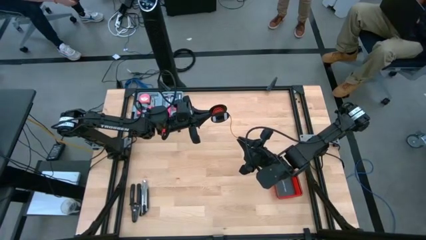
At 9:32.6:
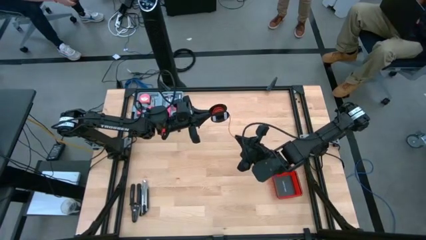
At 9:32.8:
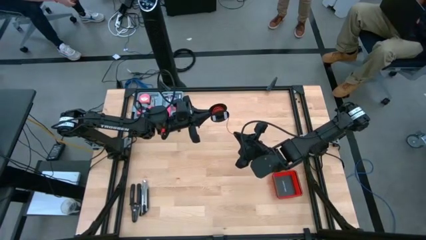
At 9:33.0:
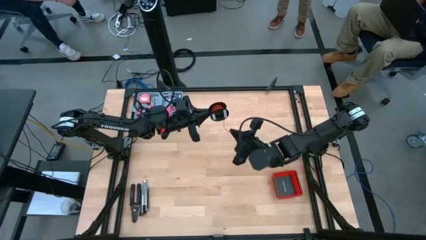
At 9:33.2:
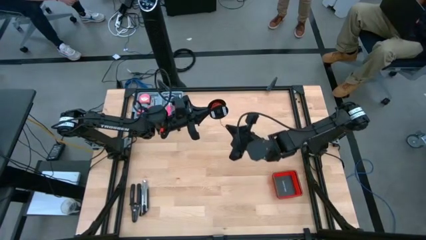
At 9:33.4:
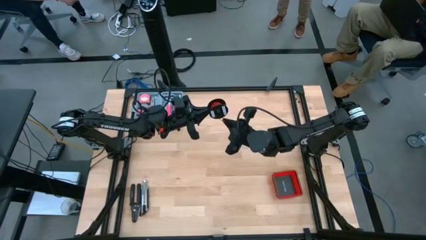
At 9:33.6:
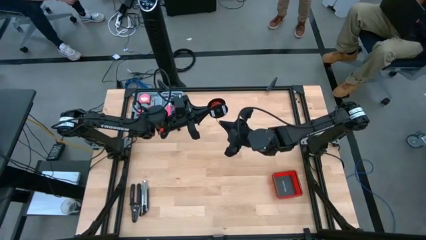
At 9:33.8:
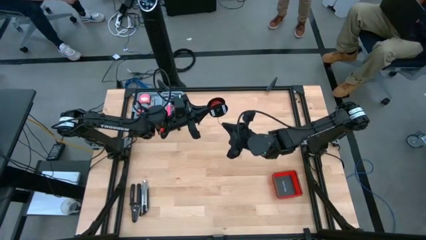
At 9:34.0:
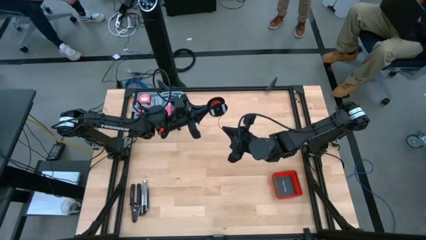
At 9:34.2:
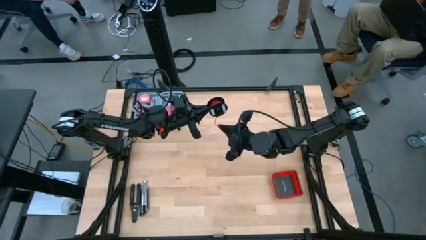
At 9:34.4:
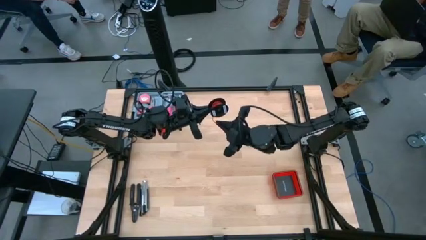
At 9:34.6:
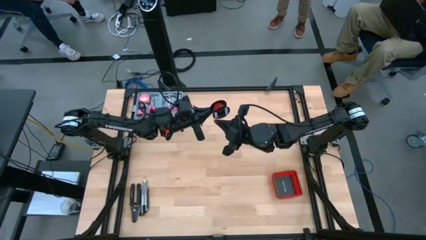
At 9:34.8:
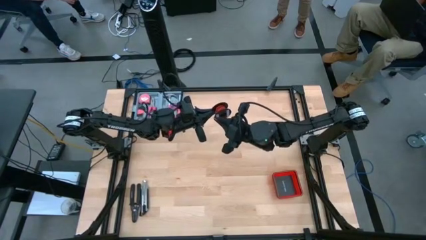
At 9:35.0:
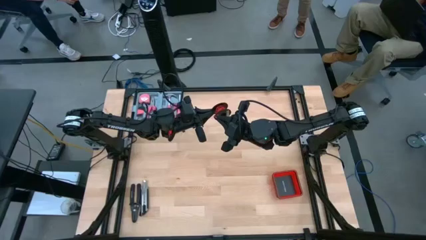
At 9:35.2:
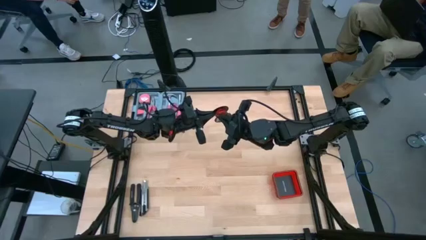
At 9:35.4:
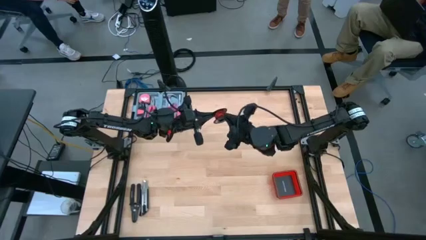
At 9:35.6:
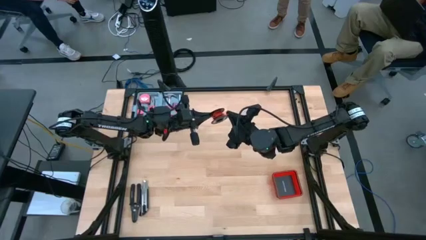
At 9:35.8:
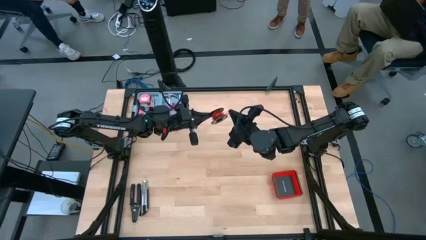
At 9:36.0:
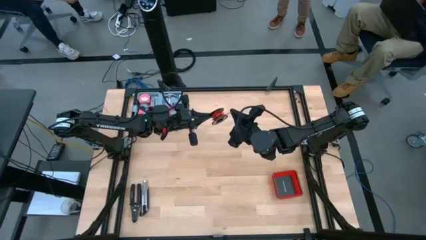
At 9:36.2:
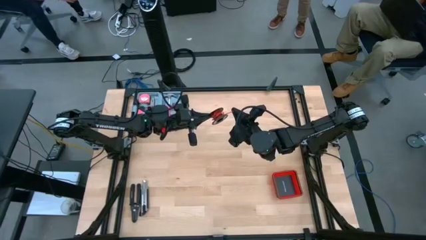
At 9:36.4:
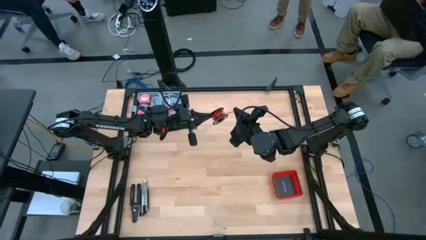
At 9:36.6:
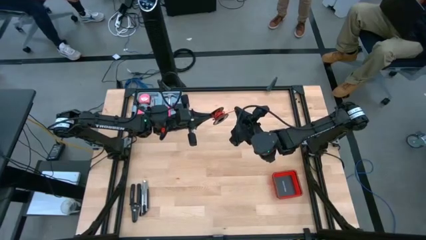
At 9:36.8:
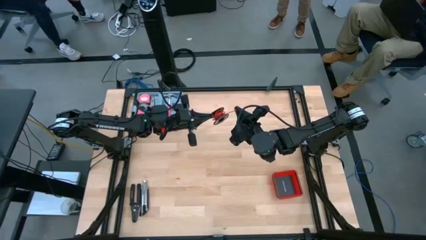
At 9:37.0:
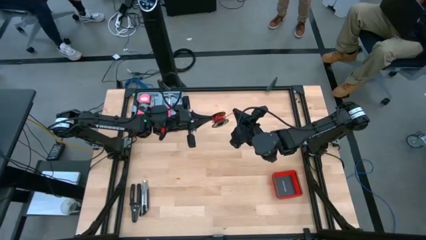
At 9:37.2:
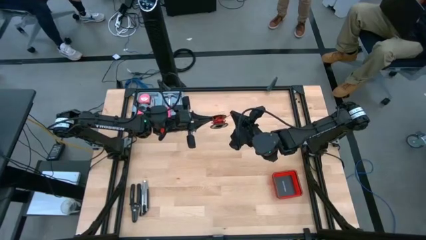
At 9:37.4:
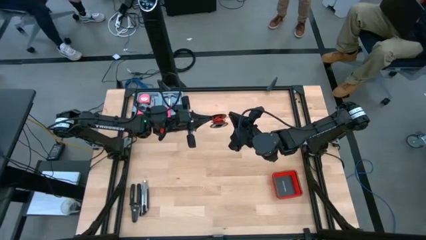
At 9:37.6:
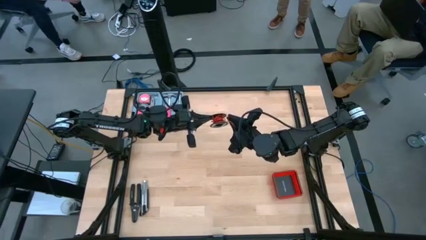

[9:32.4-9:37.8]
Task: Coil cords
Coil the red wire onto the spool

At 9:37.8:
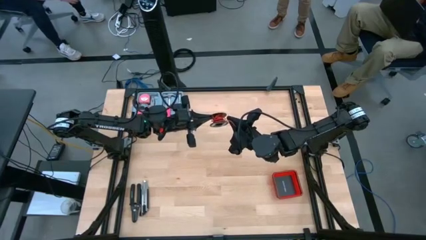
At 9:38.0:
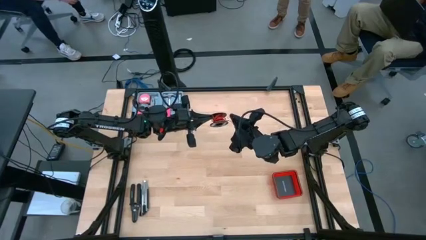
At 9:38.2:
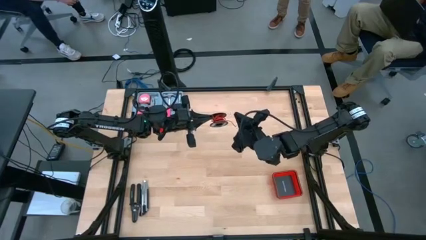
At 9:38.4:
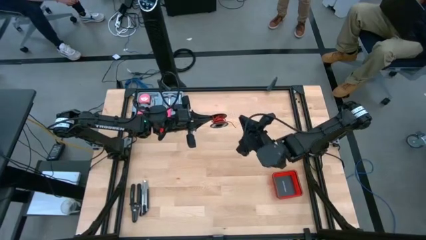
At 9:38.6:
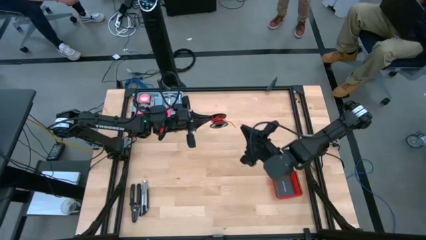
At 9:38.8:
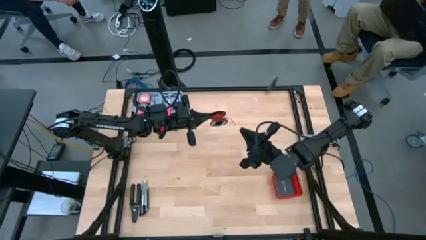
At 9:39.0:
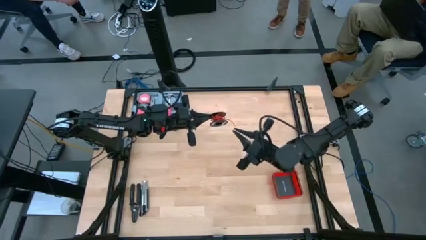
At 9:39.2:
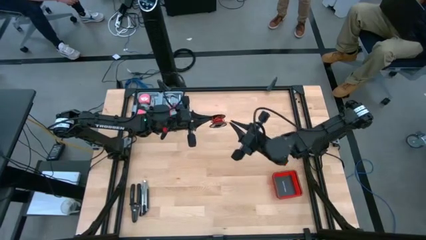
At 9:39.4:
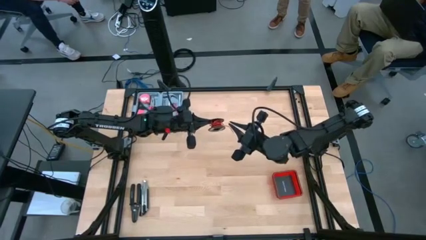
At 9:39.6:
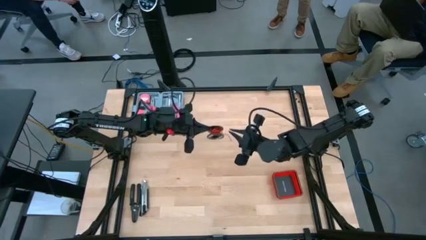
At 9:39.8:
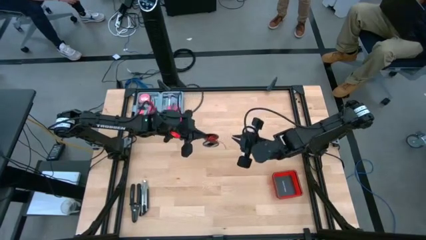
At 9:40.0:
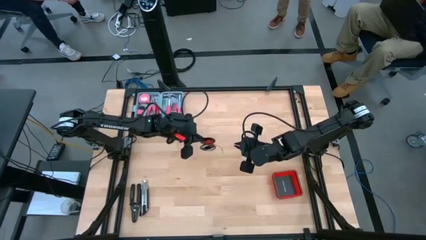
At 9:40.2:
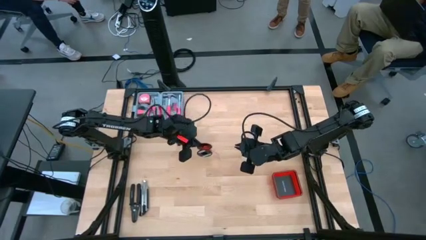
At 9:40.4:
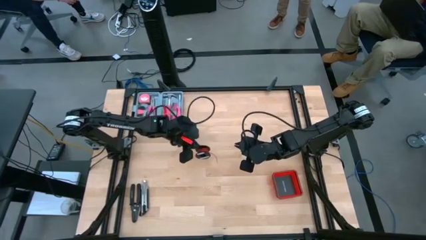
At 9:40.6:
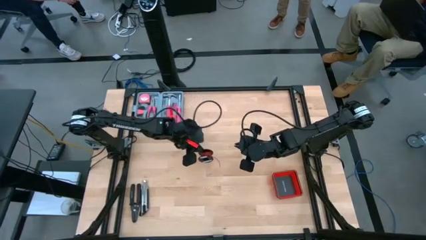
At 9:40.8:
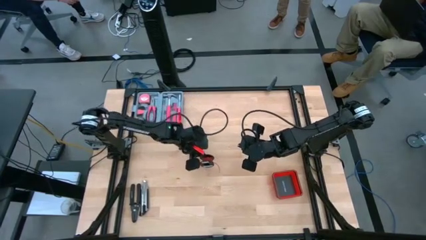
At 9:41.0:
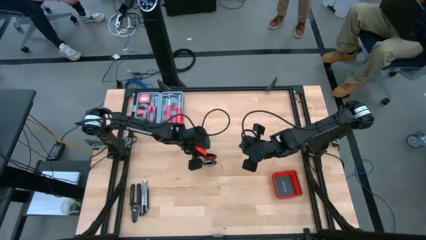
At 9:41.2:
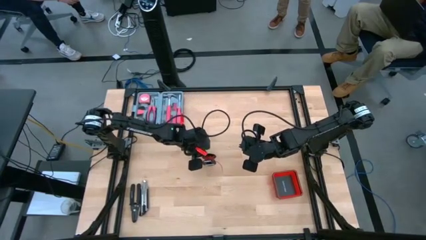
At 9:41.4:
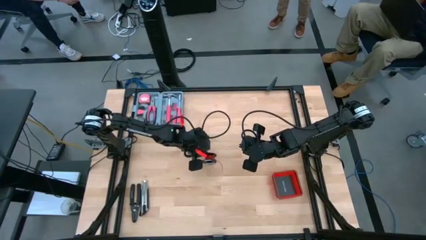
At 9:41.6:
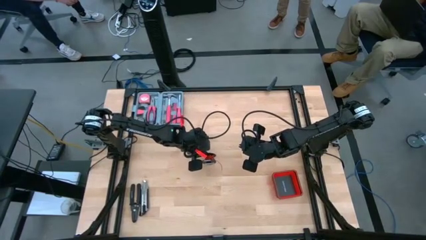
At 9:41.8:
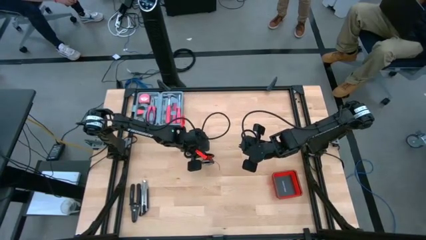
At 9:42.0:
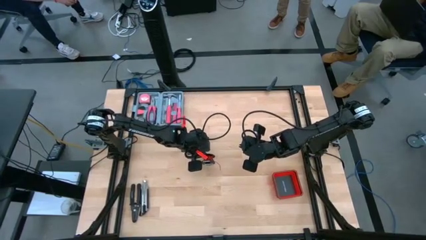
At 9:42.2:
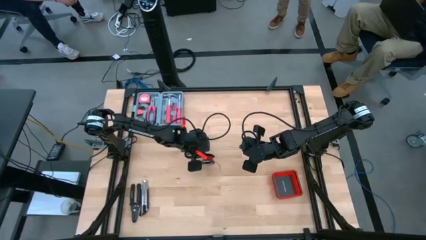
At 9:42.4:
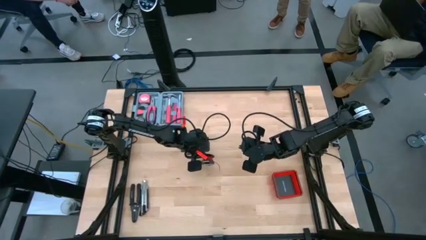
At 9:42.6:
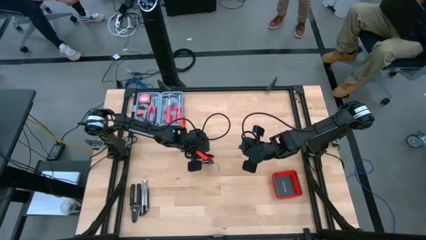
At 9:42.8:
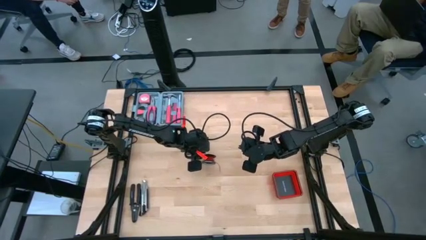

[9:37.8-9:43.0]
Put the spooled red wire in the center of the table

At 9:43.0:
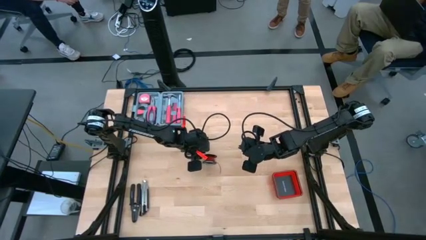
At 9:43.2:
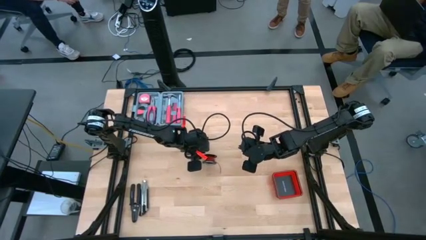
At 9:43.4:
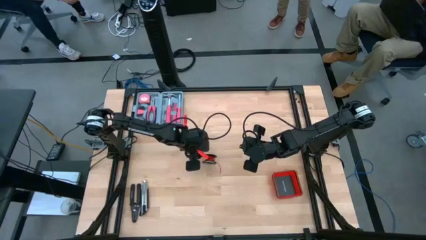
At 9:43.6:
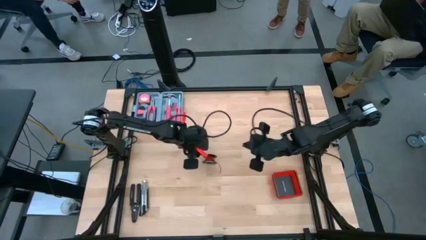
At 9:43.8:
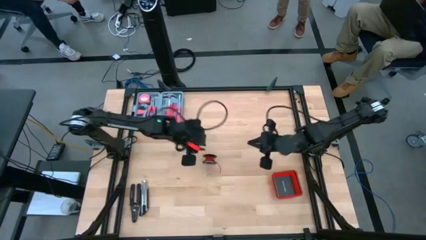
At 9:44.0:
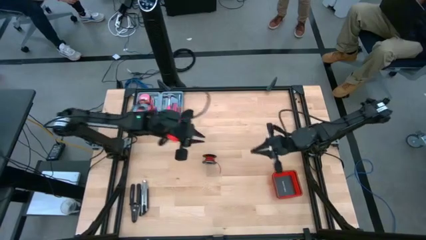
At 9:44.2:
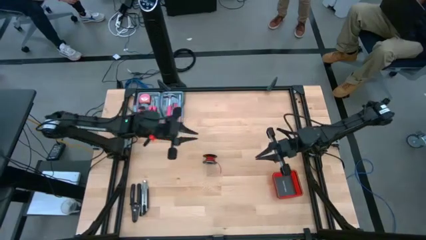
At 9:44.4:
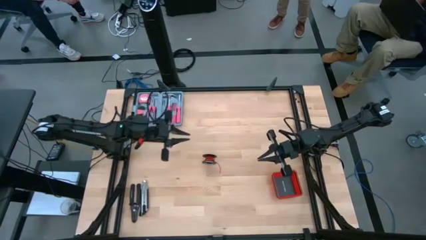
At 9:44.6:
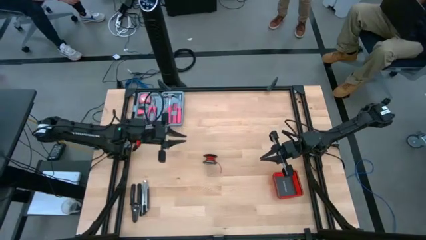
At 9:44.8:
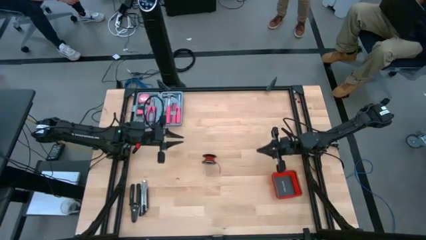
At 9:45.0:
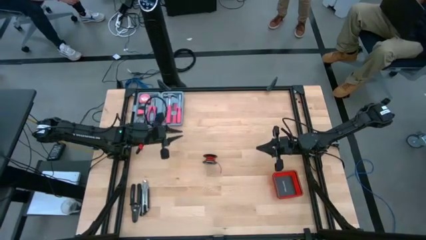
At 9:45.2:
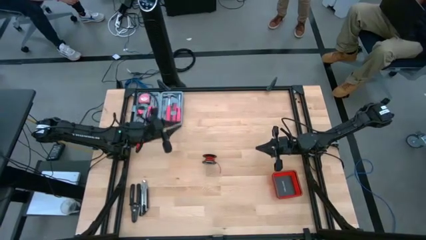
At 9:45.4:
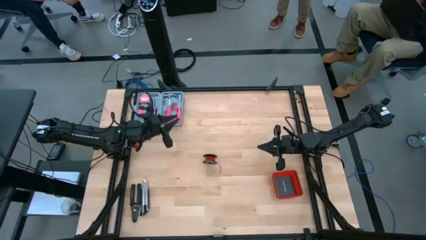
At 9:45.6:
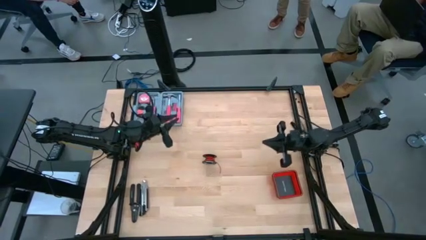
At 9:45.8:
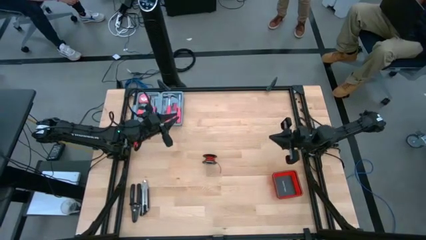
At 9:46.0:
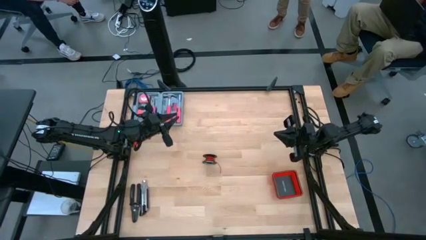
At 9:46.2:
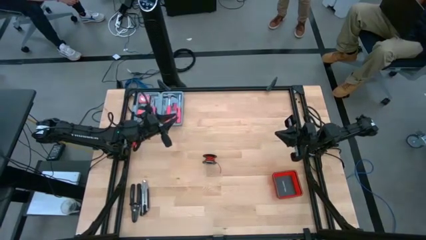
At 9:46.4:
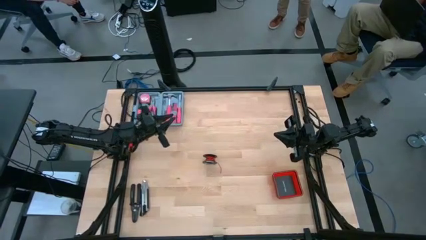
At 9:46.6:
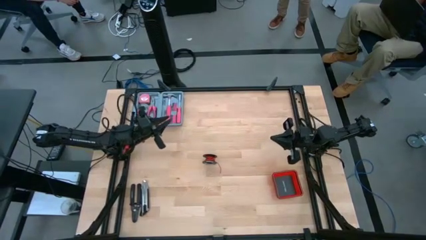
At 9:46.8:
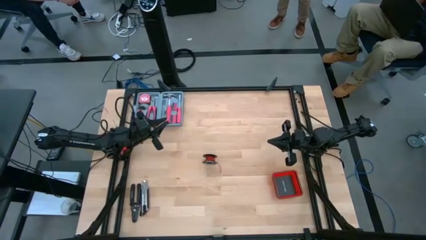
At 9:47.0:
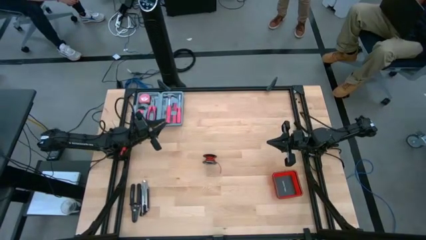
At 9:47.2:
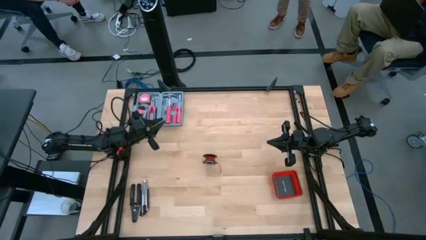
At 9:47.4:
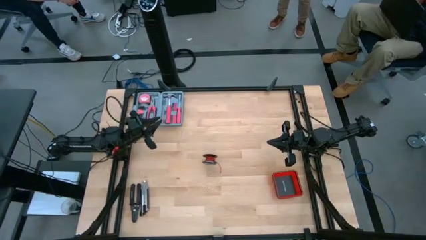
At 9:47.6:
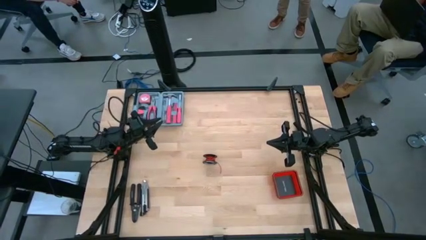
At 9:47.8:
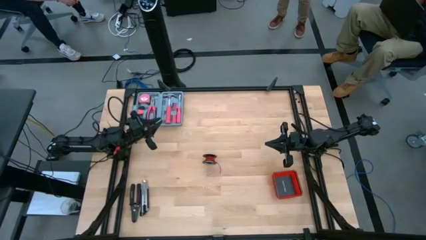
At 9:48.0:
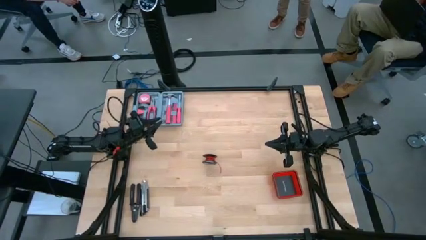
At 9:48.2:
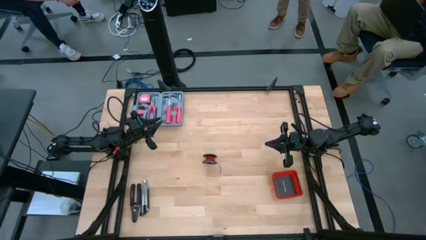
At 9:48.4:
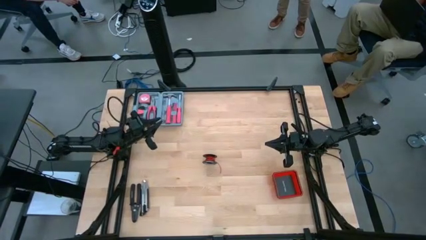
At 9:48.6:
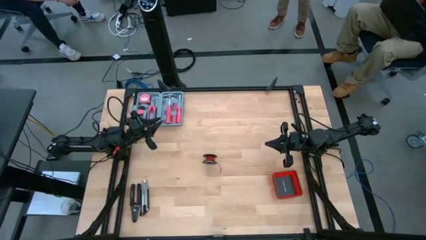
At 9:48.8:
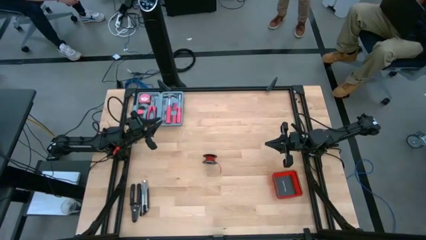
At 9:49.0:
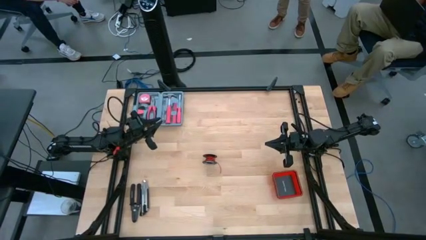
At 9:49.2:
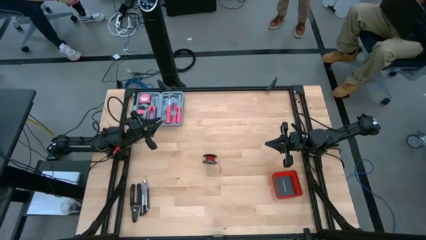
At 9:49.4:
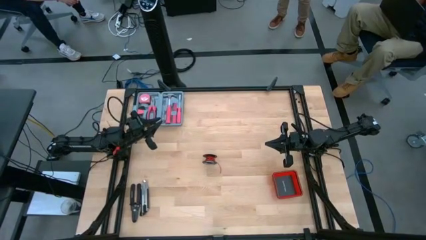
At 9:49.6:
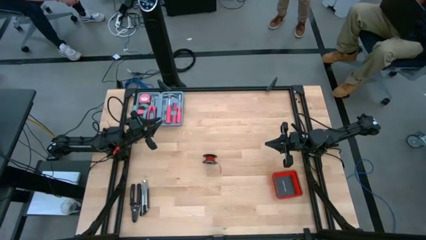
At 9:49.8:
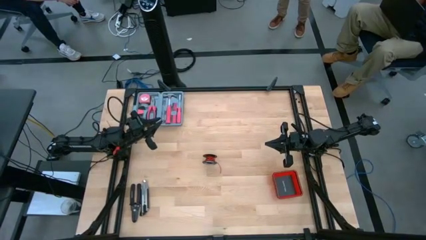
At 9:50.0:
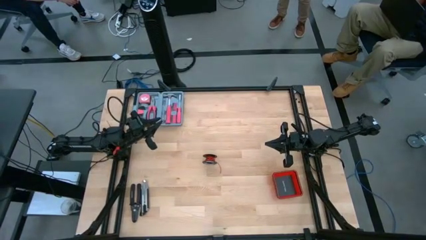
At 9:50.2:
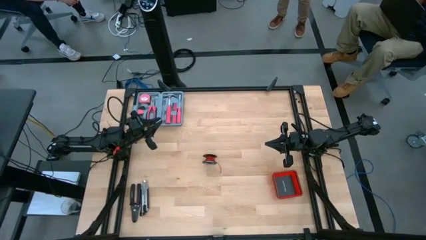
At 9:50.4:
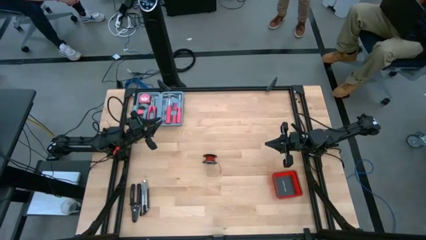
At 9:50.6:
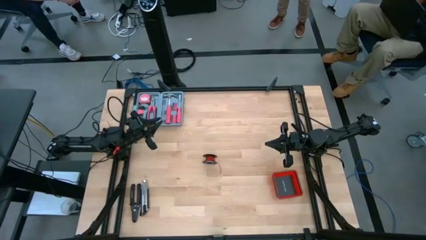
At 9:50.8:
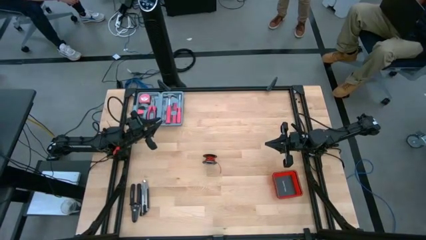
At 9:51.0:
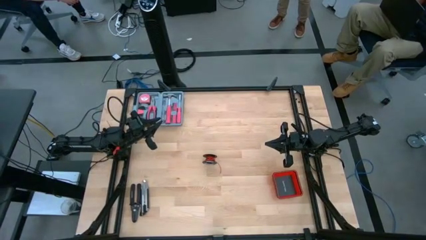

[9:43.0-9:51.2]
Return to Home Position
